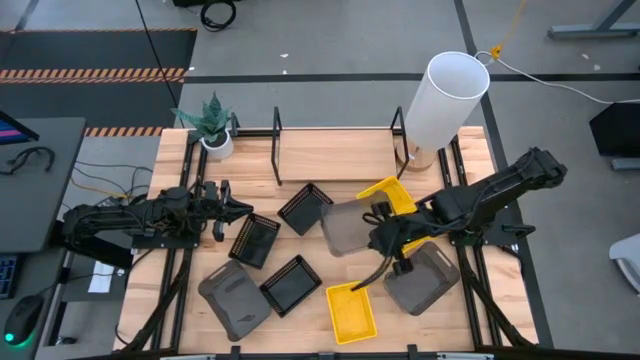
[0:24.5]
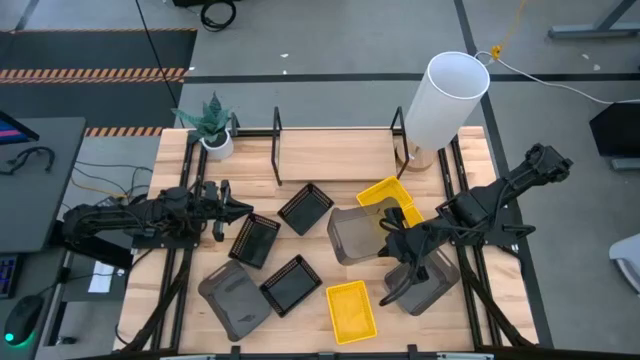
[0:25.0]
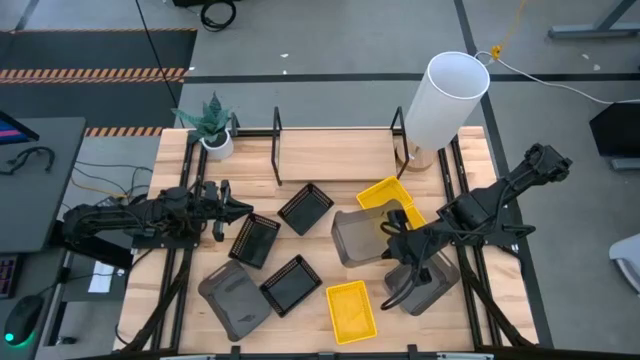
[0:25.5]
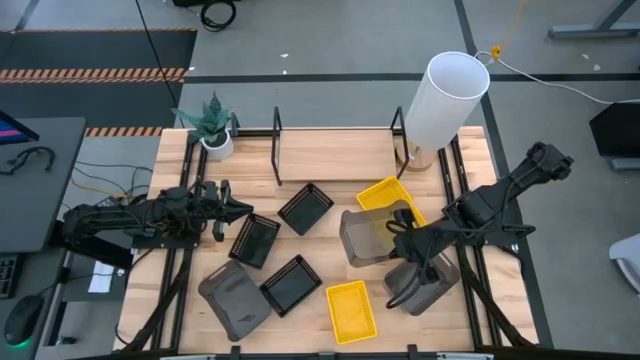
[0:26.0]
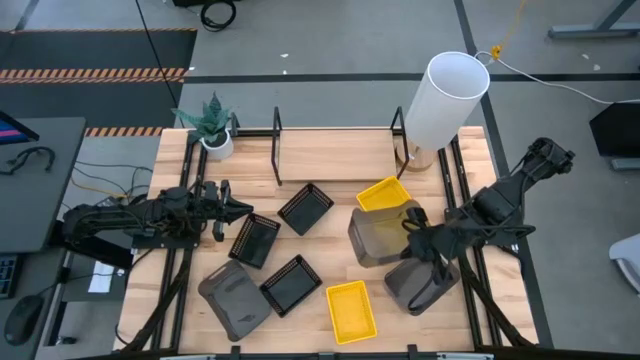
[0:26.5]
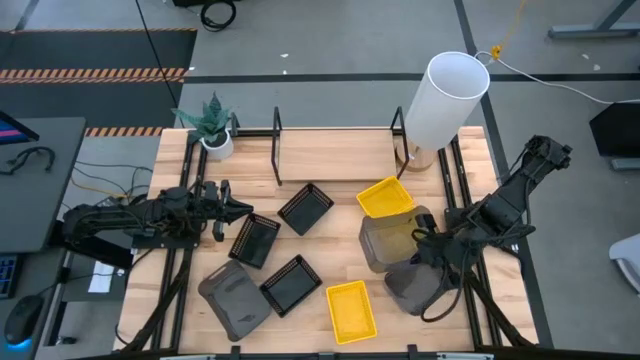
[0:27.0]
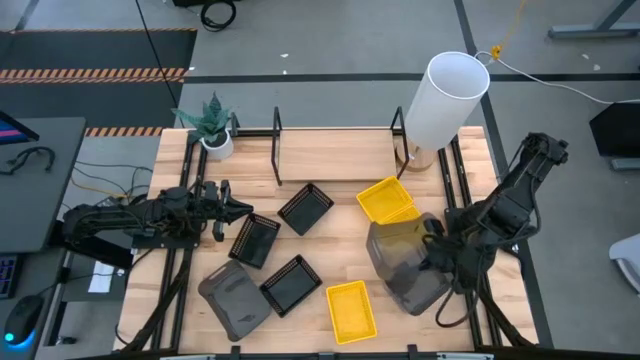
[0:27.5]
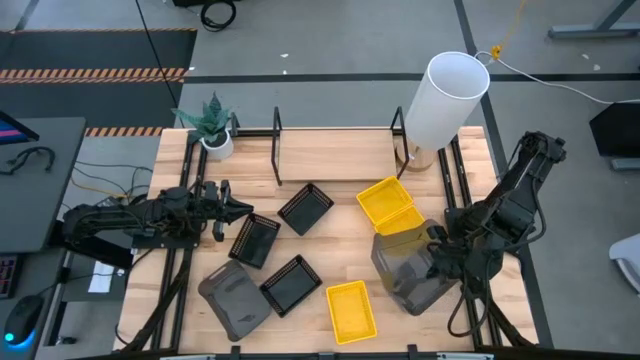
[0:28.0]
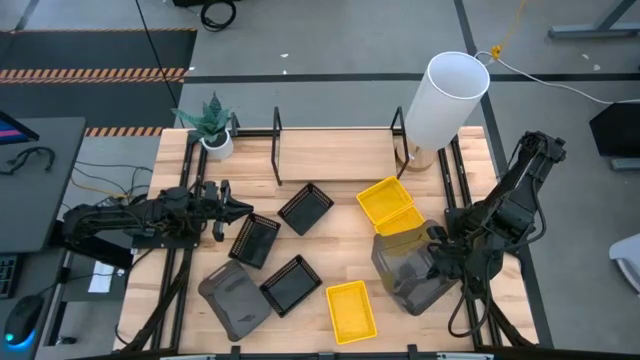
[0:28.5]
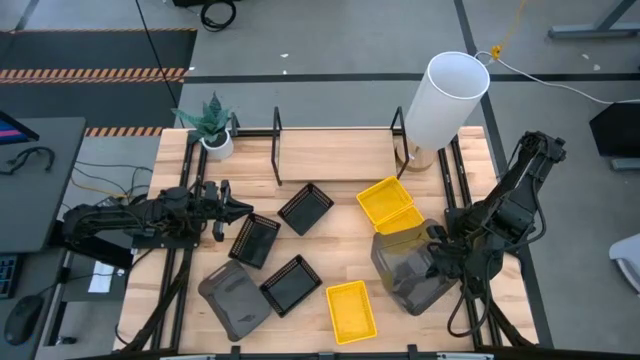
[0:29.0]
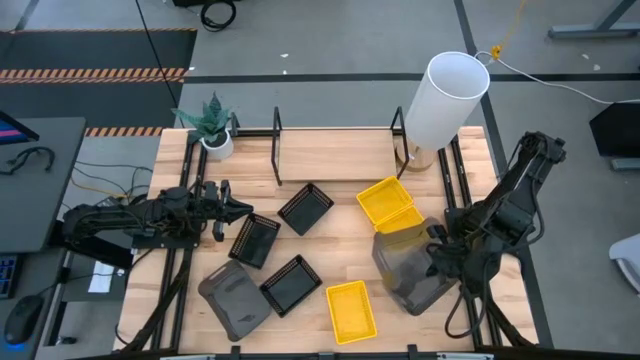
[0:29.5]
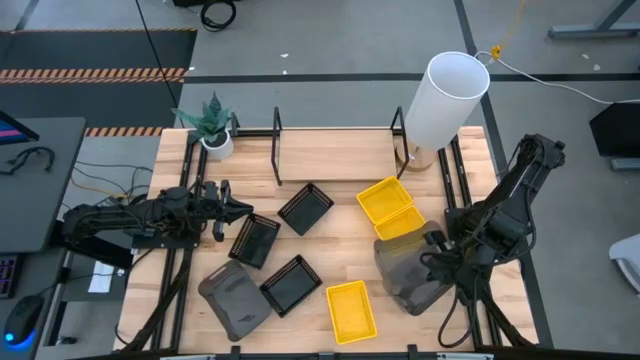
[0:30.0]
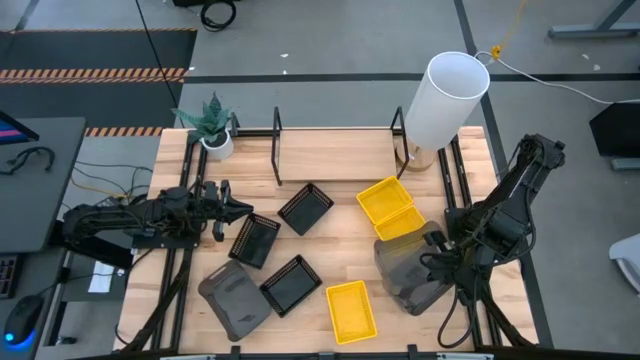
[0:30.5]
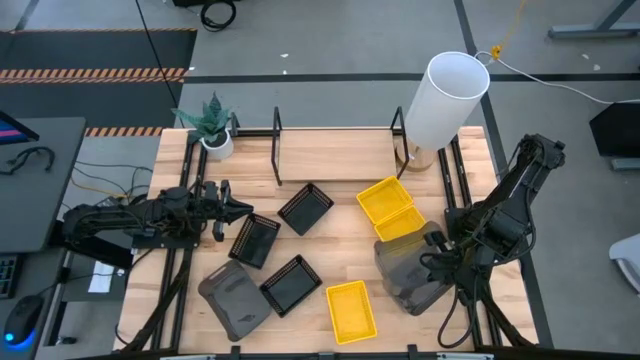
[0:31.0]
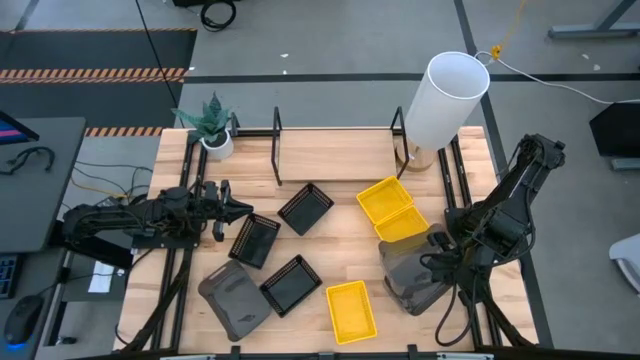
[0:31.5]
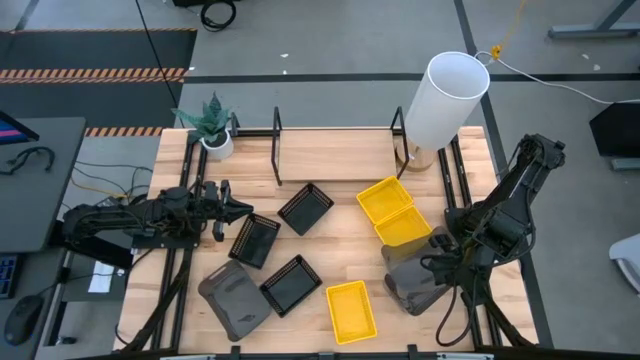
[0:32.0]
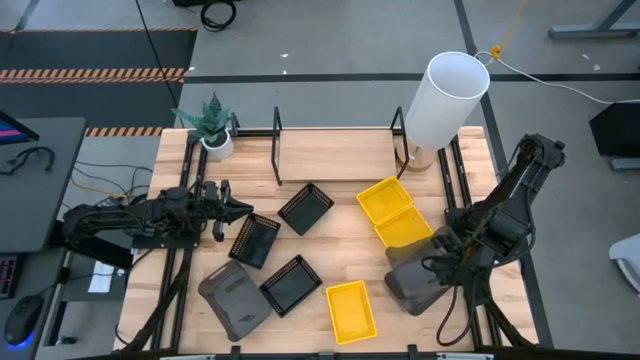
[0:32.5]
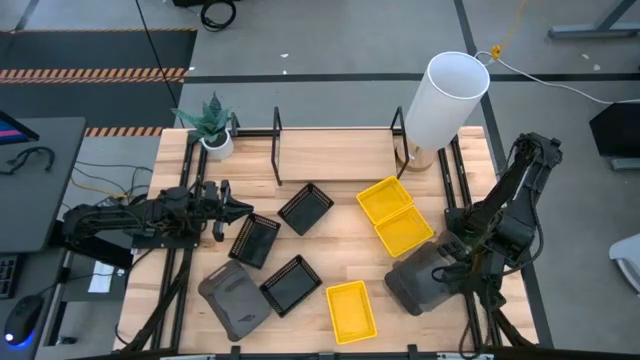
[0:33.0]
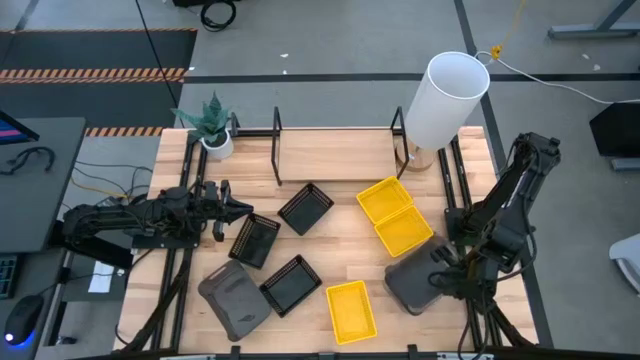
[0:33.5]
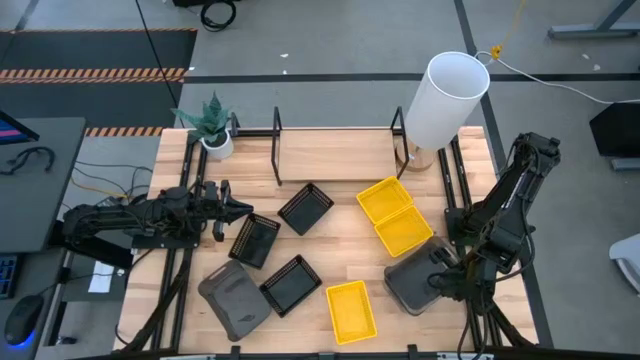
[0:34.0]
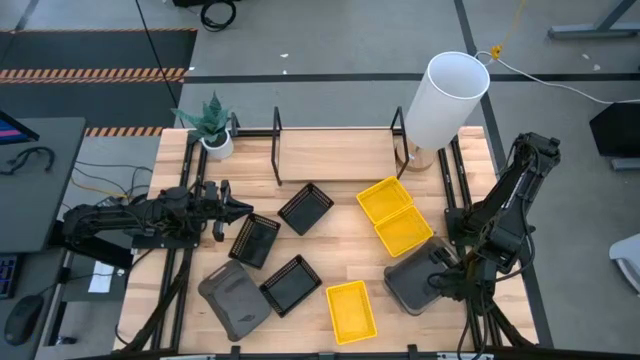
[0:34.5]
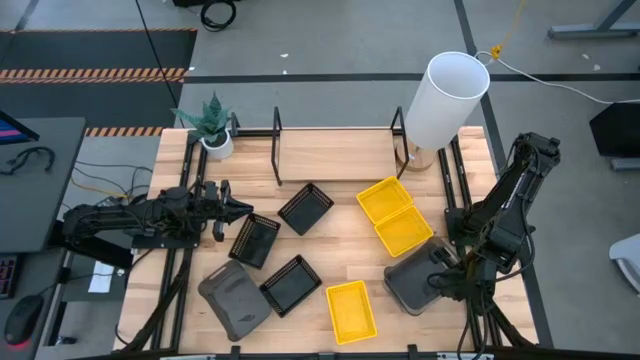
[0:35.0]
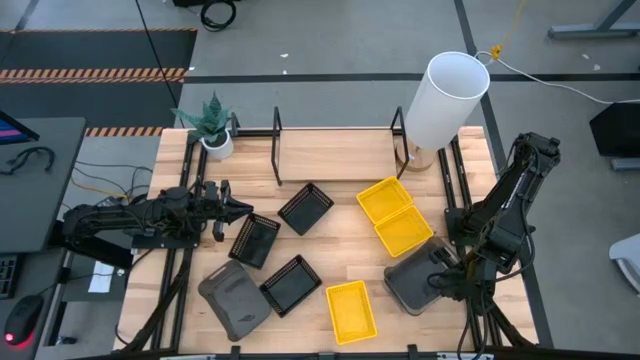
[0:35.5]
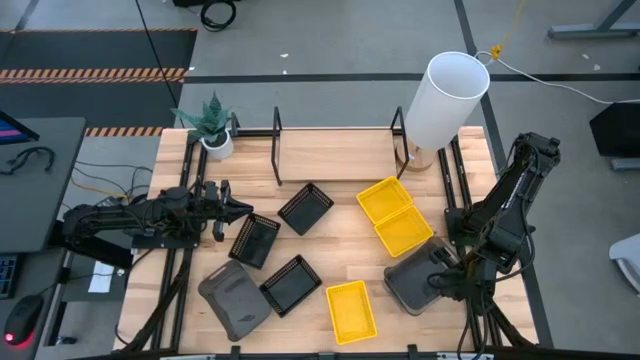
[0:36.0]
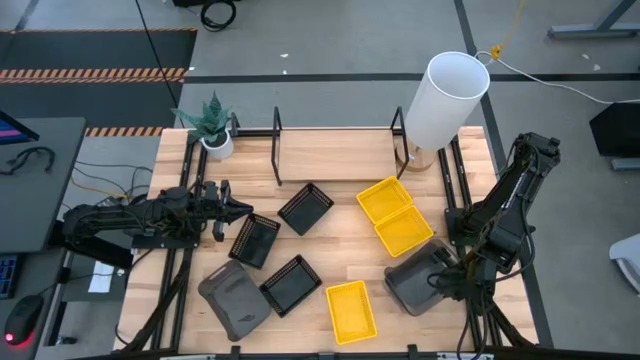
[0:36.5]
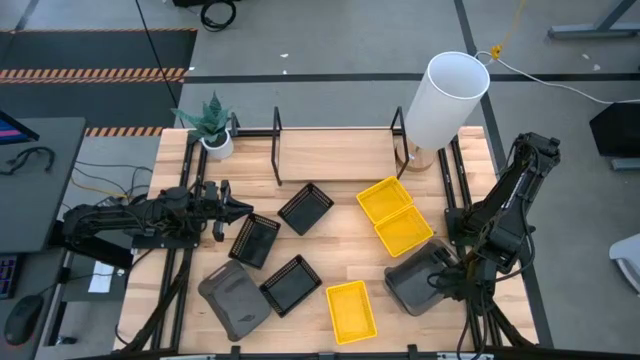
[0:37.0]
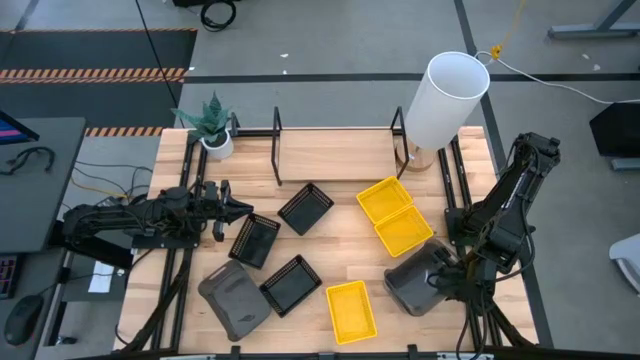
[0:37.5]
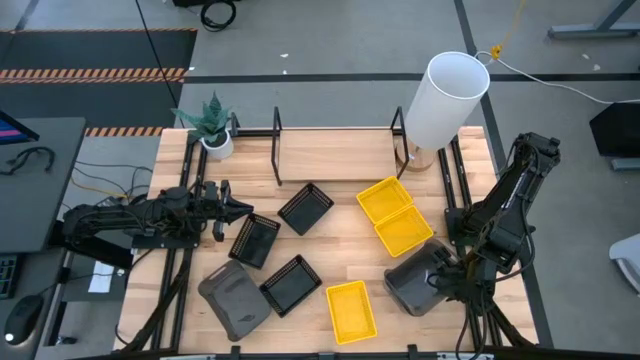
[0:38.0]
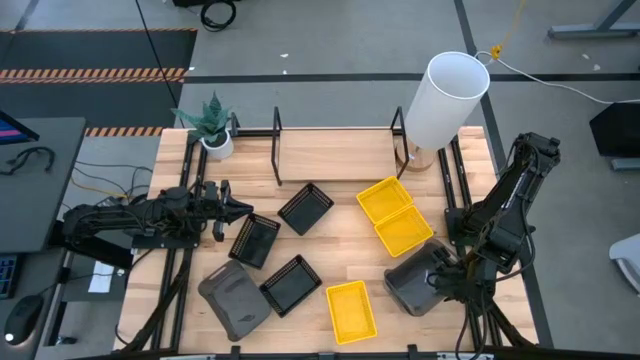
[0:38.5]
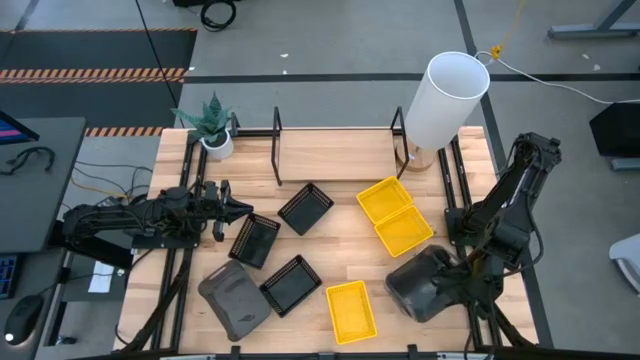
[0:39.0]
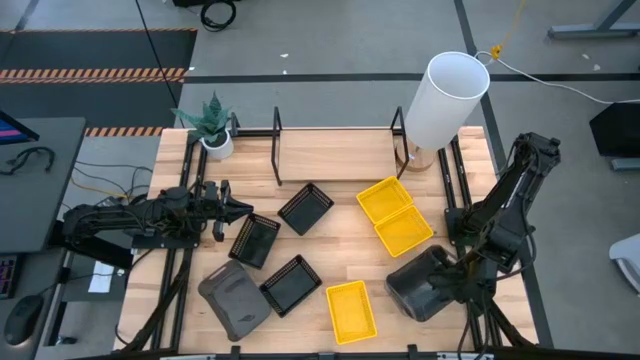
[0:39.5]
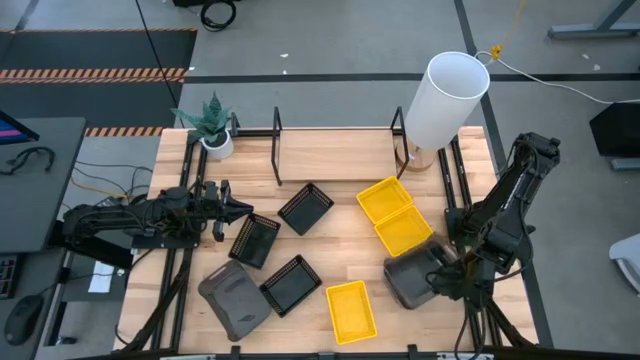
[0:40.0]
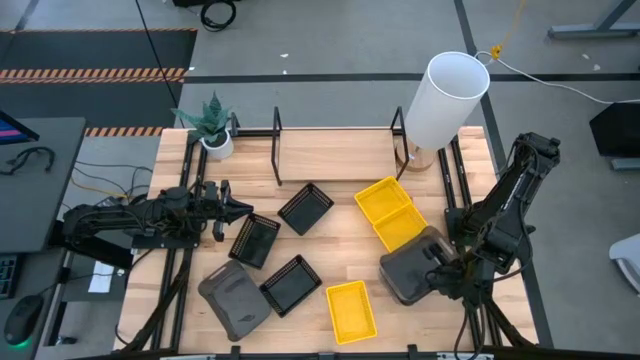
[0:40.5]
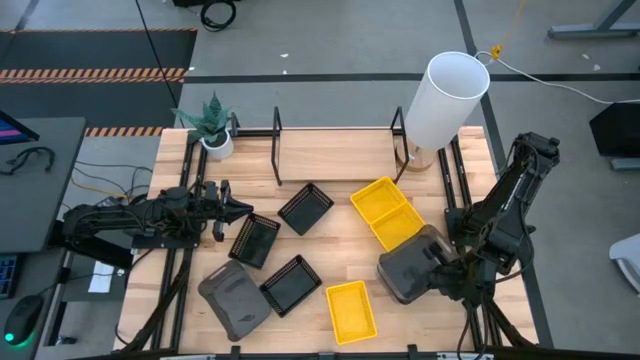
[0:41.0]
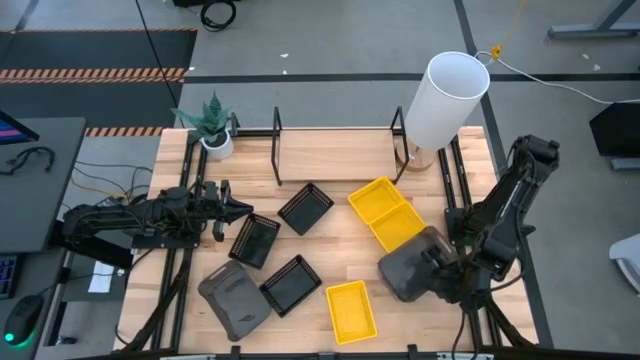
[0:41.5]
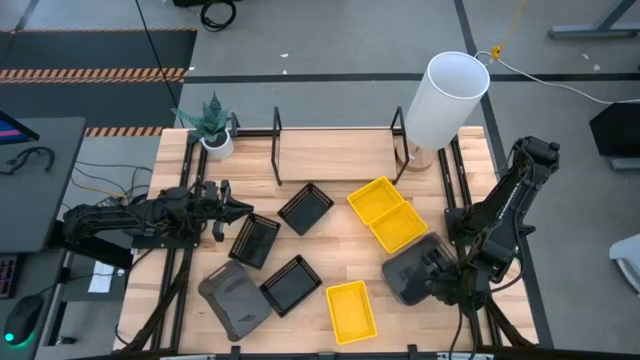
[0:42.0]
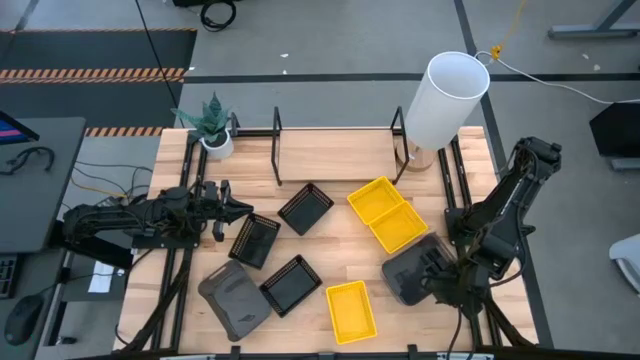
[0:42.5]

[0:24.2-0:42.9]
Task: Stack baskets on shelf by color
Stack the middle black transparent bin on the right black transparent bin
